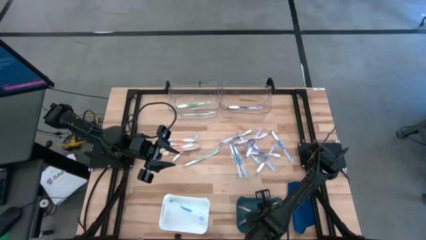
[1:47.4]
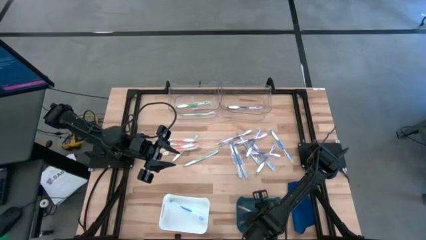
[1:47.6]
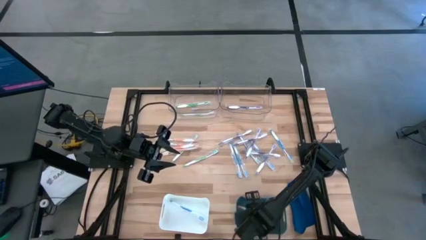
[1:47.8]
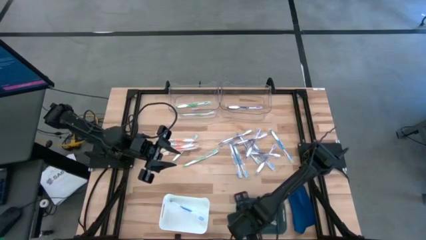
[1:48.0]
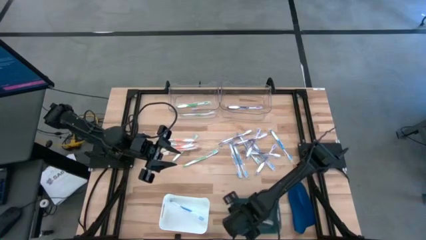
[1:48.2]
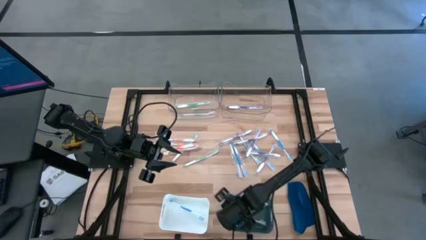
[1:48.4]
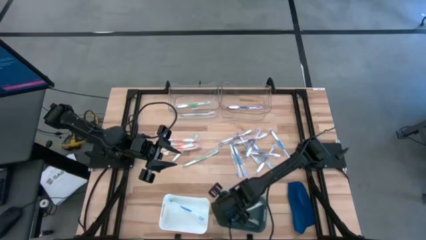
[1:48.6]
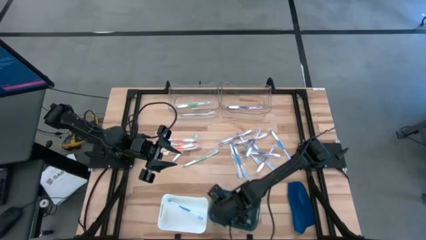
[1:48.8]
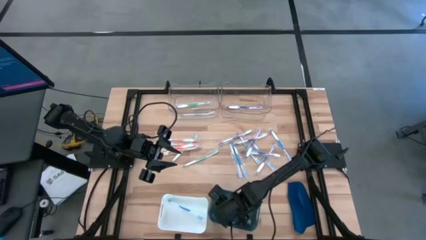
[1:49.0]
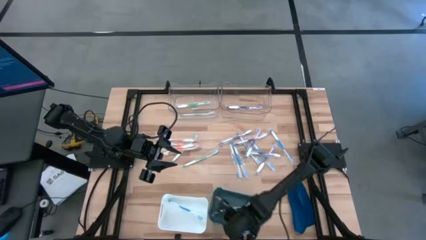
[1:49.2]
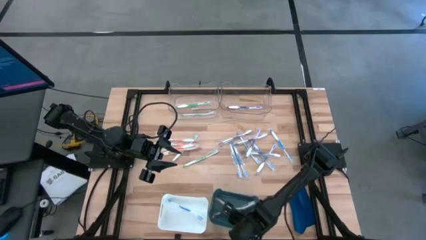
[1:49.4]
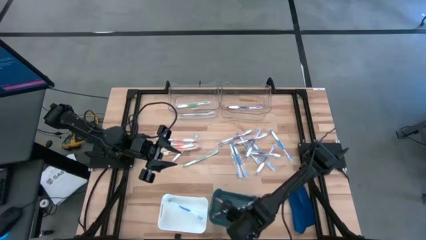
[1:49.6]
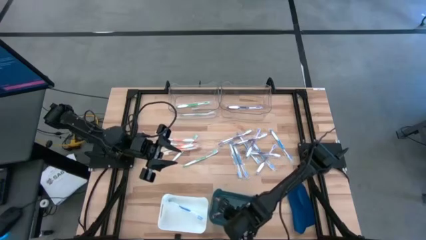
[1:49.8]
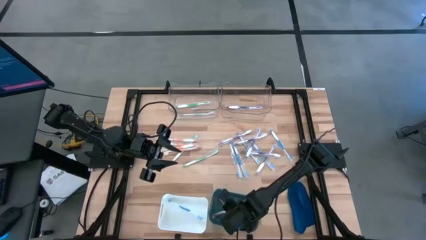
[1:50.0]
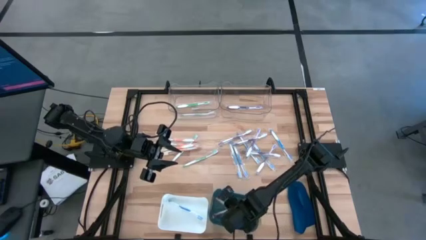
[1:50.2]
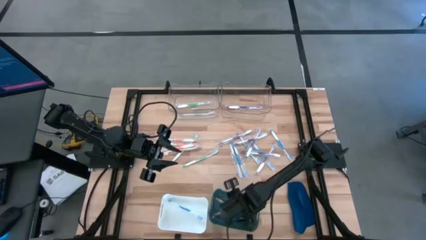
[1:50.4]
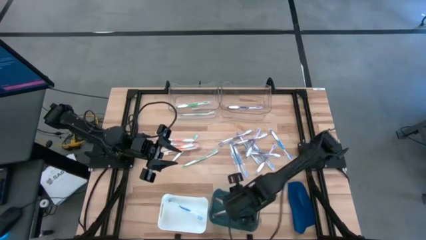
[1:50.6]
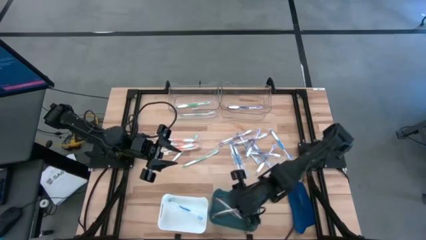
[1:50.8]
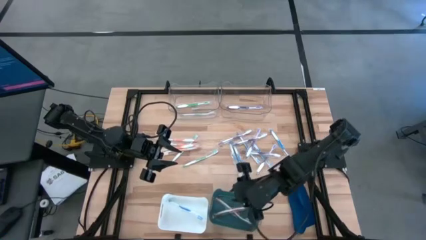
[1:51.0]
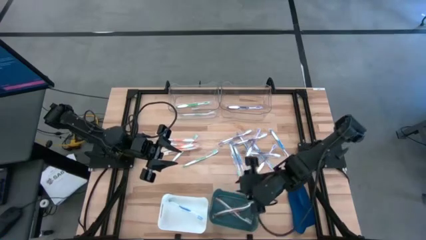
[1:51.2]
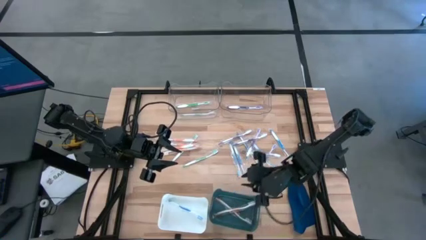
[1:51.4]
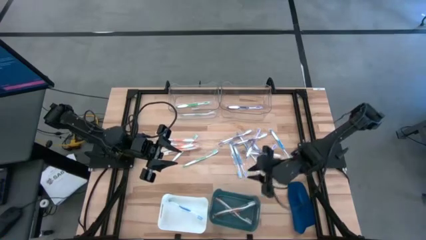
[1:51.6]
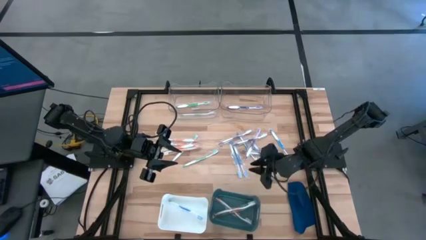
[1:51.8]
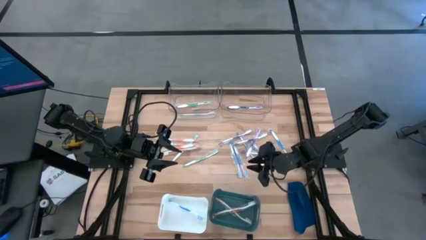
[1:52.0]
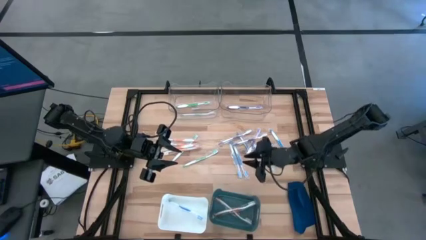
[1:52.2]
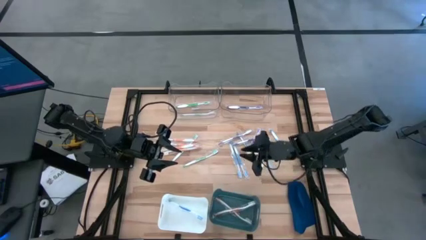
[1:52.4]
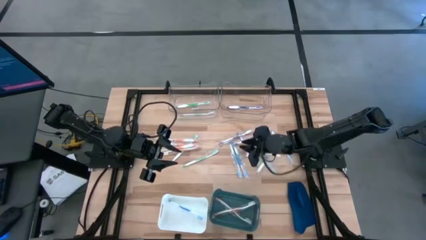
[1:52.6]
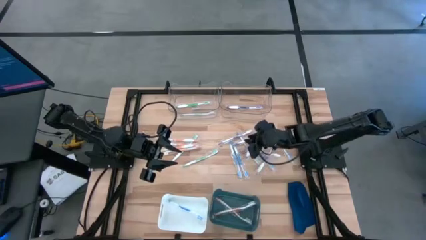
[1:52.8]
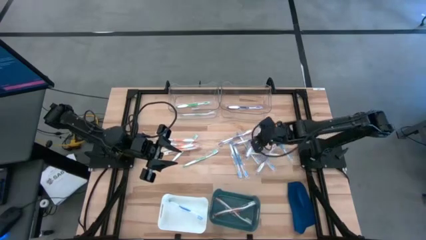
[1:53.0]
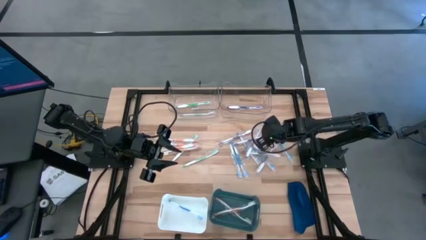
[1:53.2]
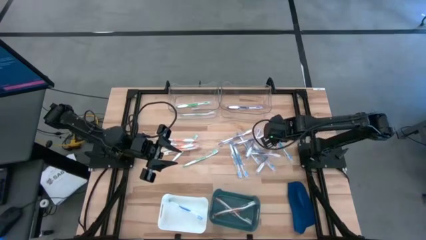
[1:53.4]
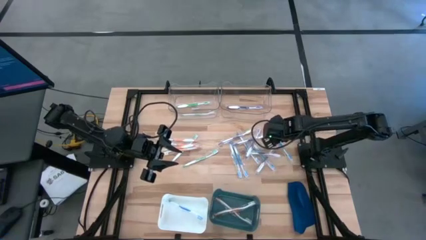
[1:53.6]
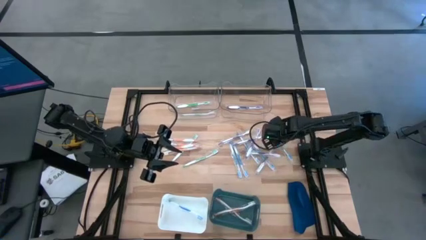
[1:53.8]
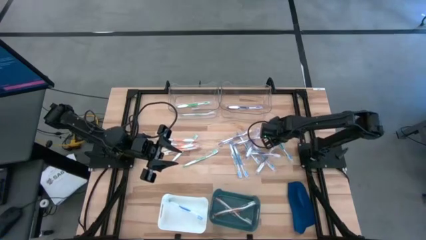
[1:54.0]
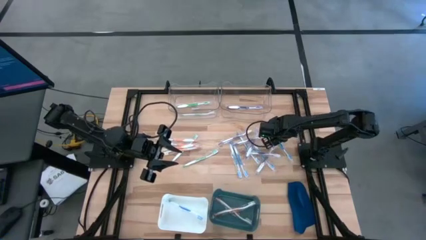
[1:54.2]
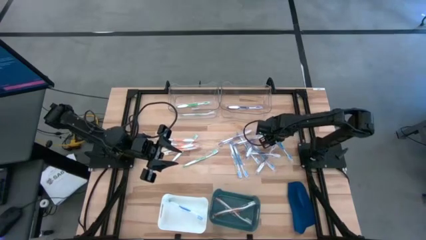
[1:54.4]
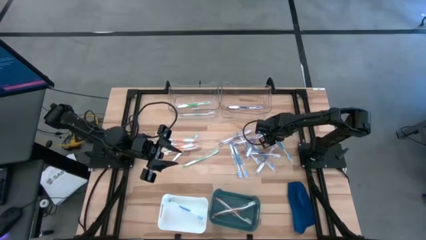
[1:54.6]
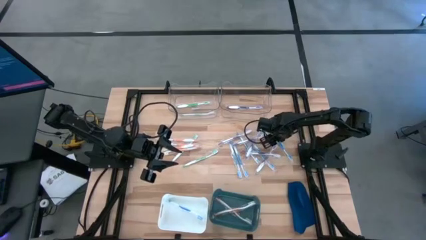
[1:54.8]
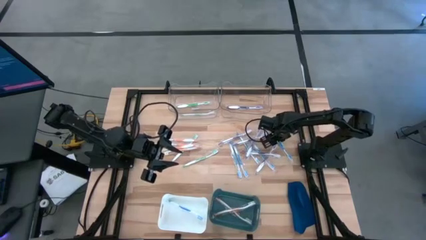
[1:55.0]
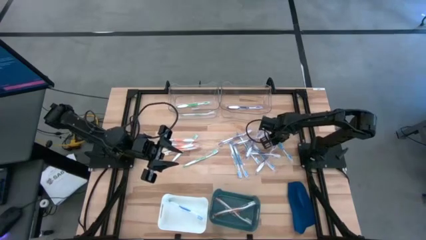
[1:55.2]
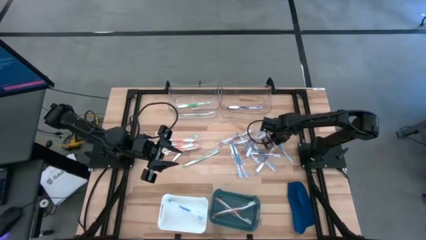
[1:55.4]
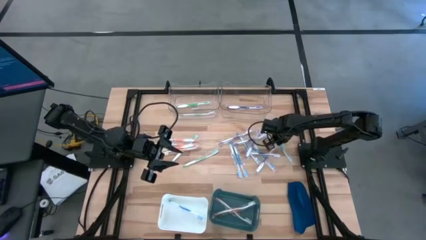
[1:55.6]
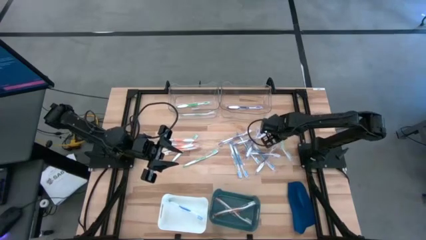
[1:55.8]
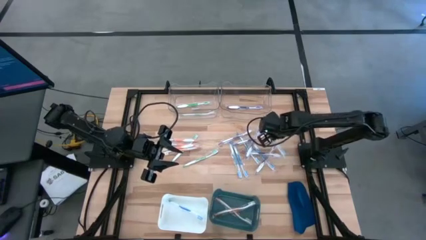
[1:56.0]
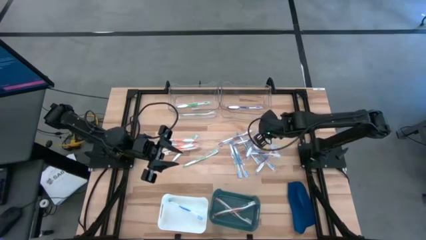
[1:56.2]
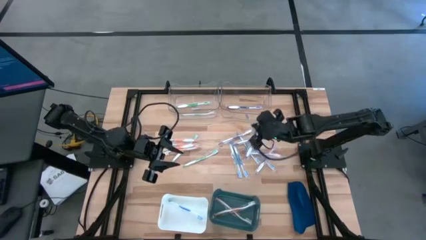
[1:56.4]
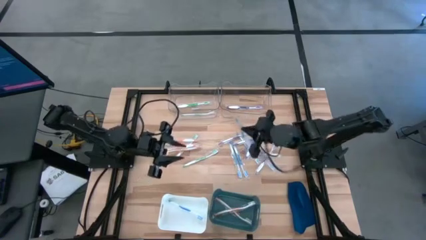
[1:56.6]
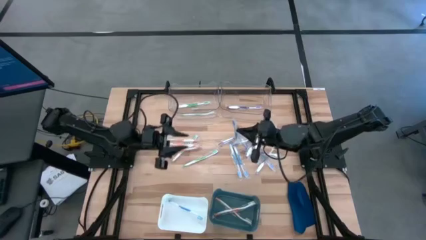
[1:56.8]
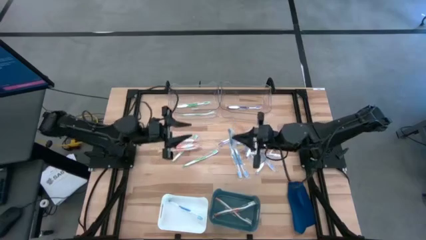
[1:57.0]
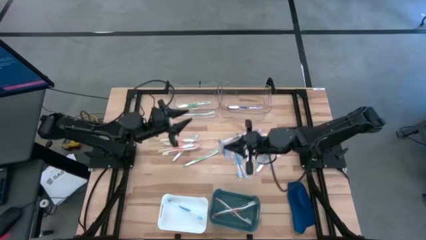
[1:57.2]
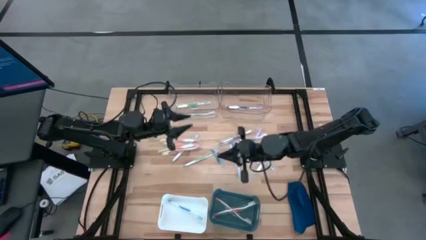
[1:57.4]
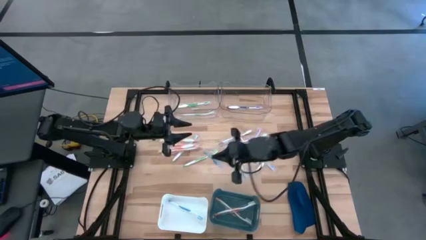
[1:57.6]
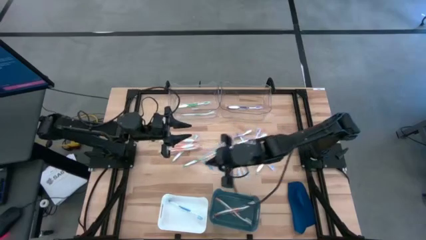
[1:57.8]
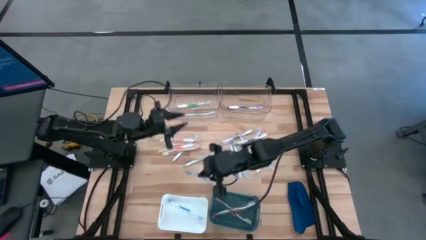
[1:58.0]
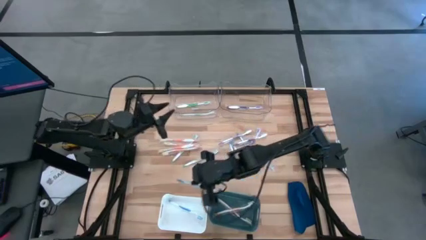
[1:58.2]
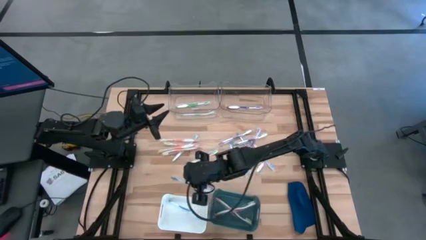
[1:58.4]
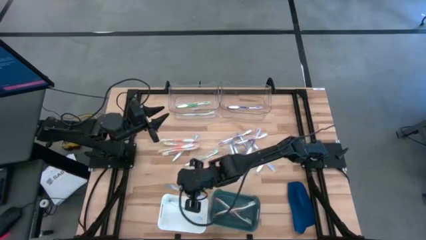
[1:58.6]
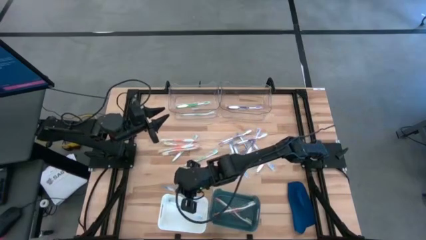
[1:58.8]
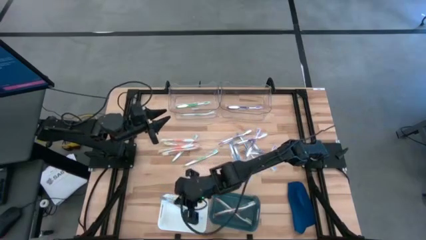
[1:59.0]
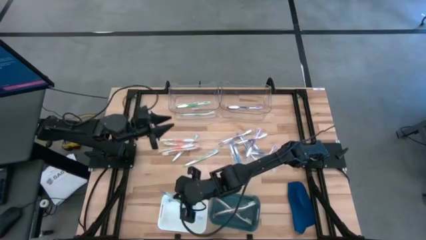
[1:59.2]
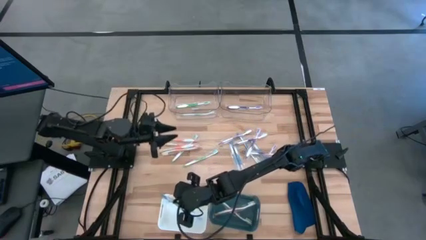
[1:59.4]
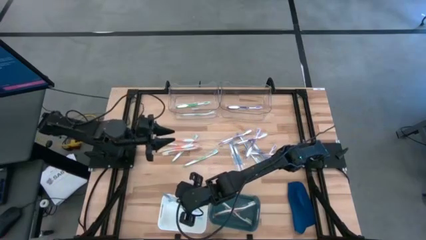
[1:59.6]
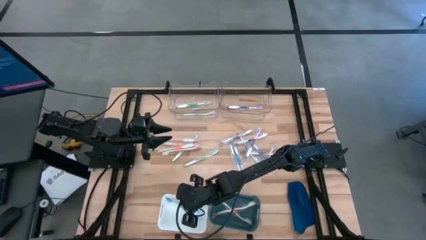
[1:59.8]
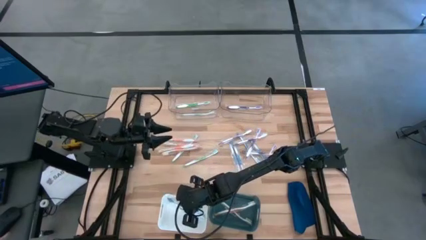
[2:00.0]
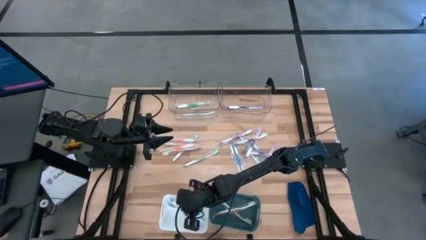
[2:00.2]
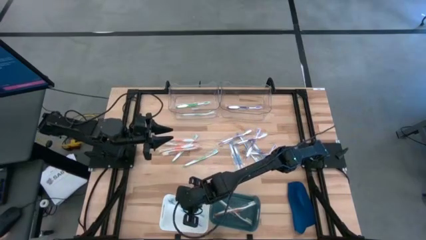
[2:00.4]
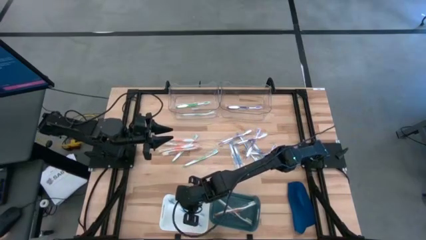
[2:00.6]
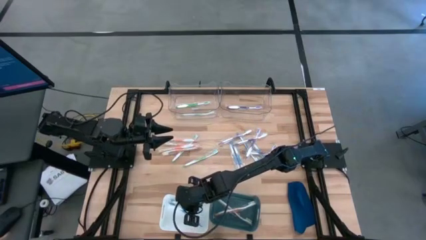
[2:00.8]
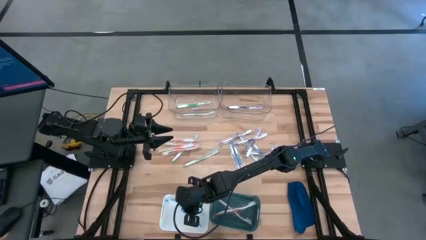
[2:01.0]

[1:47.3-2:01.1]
Task: Pick & Place Toothbrushes
Put the blue toothbrush into the white bin

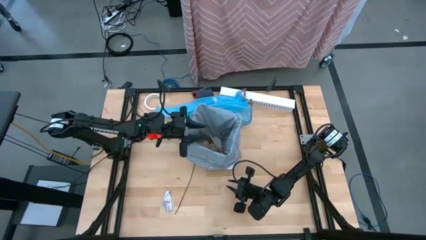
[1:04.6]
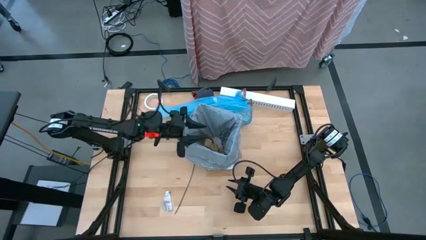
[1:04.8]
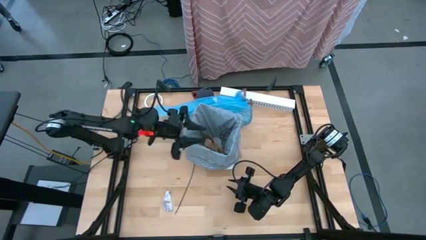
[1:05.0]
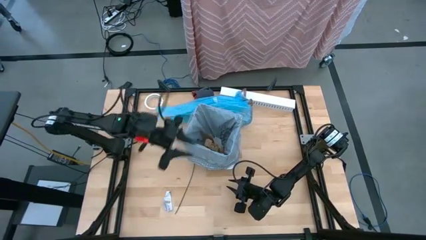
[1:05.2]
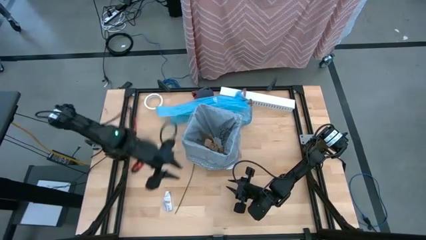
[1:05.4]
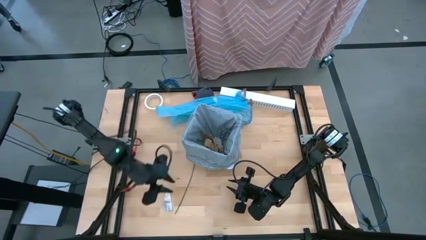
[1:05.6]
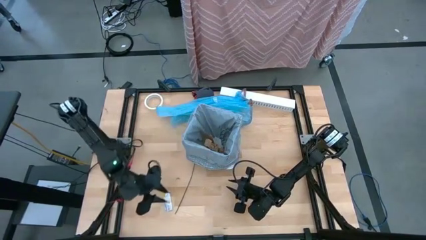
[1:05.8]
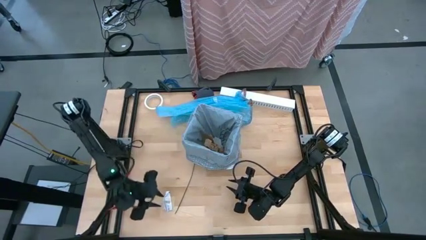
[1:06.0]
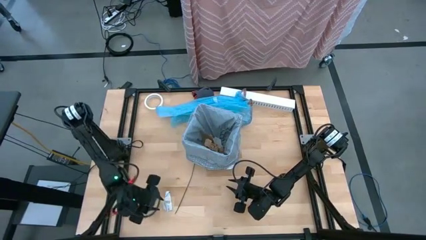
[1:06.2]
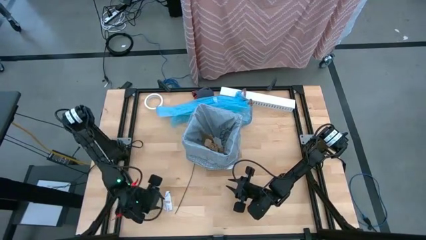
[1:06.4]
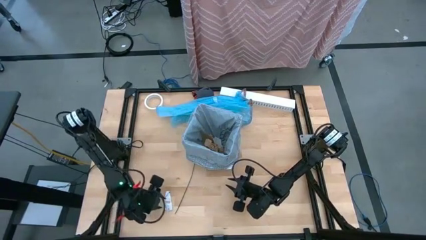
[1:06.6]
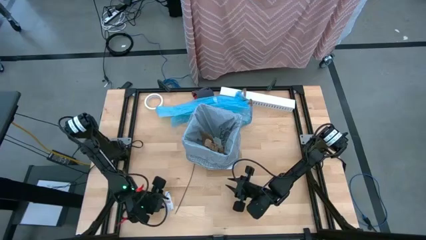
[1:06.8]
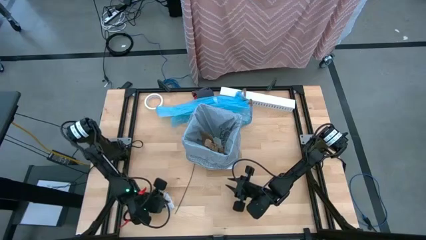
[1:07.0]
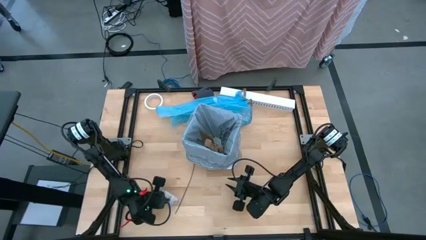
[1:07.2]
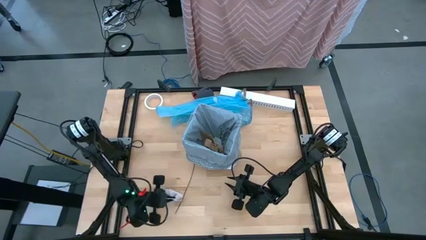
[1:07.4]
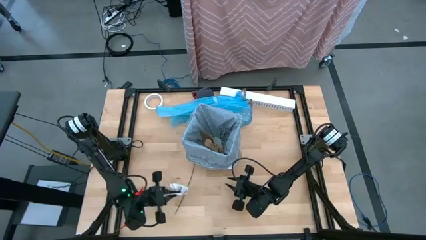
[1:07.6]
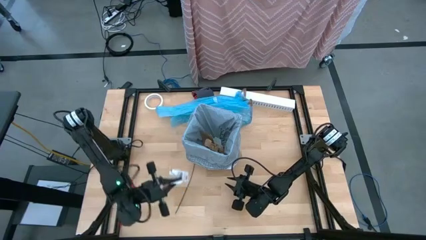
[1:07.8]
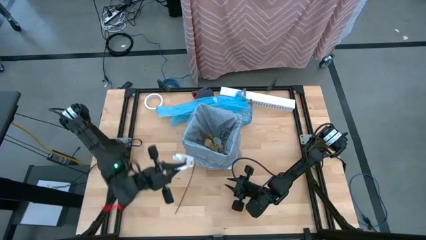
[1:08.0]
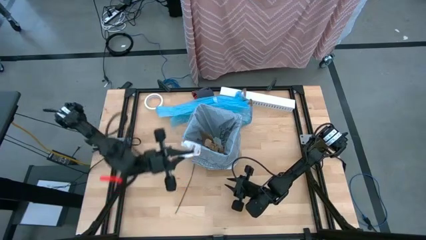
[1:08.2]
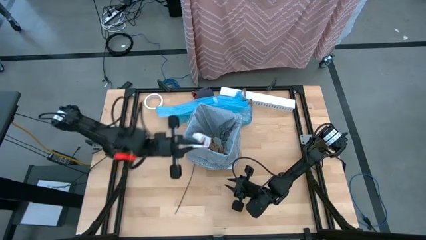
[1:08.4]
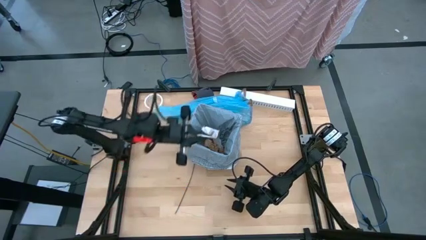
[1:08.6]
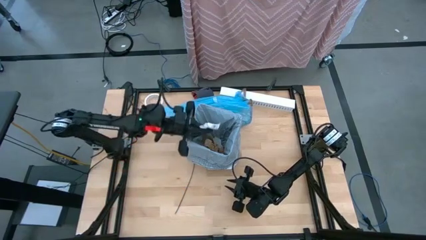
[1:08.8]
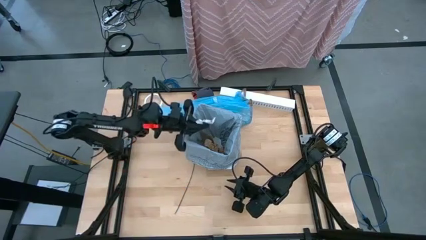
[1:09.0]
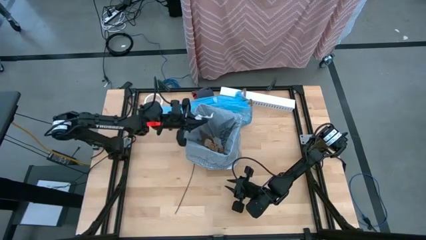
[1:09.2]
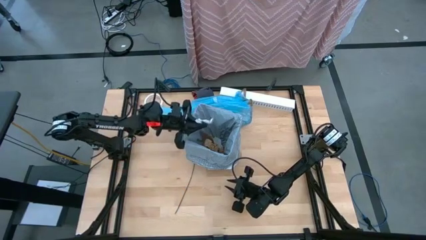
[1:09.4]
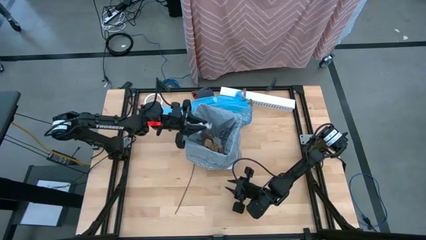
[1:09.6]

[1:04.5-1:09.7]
Task: place trash/remove bag and relplace
Put the white receipt inside the black trash bin
